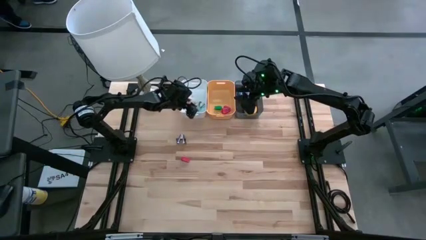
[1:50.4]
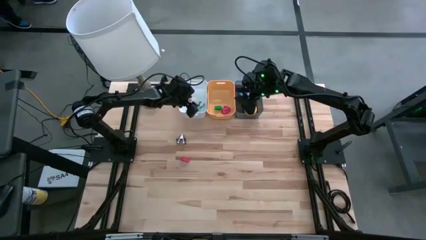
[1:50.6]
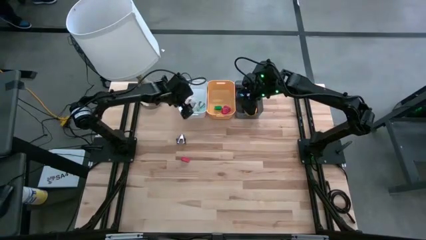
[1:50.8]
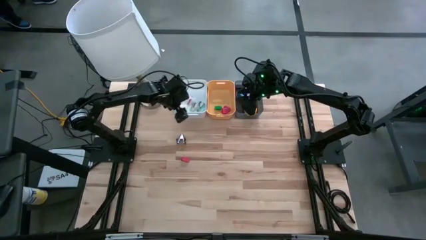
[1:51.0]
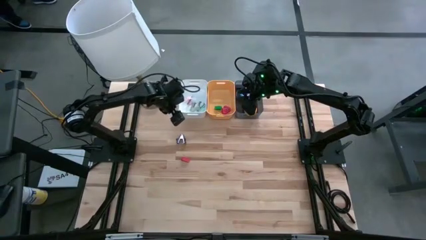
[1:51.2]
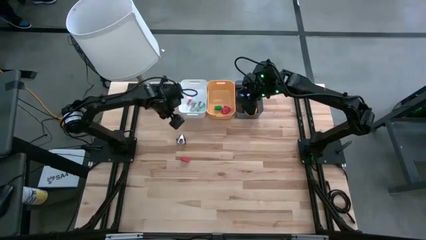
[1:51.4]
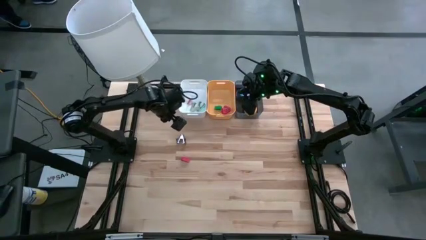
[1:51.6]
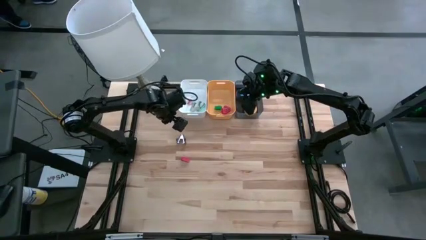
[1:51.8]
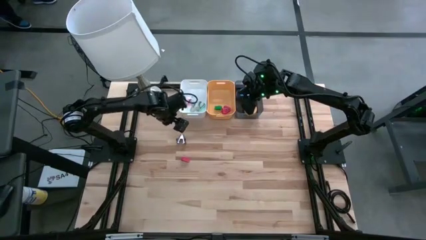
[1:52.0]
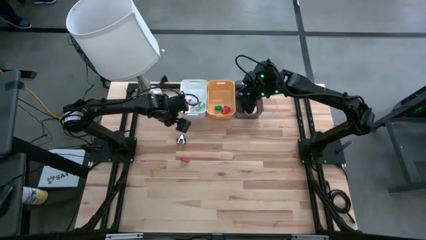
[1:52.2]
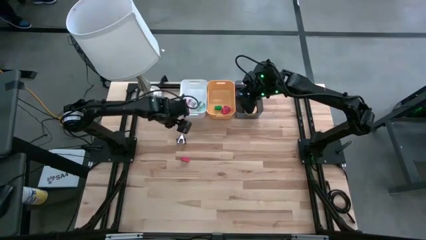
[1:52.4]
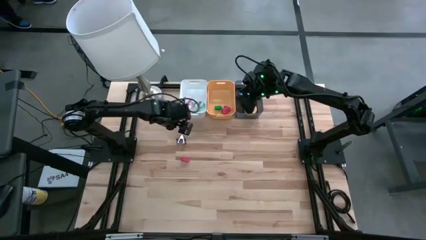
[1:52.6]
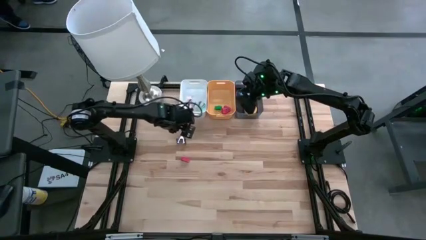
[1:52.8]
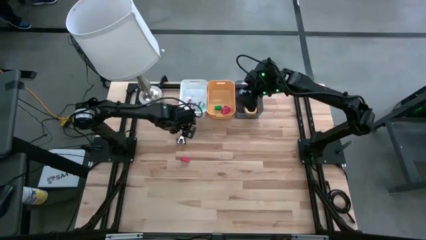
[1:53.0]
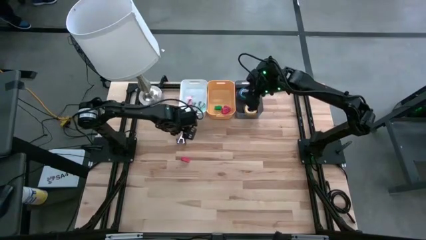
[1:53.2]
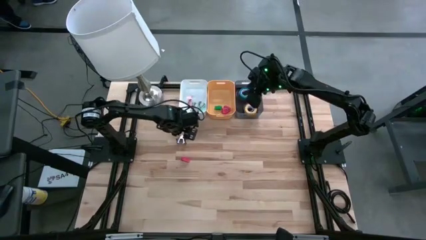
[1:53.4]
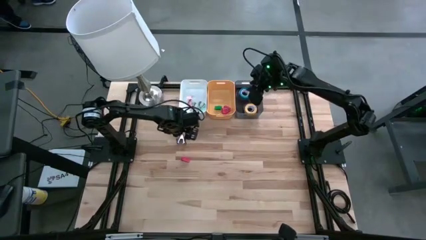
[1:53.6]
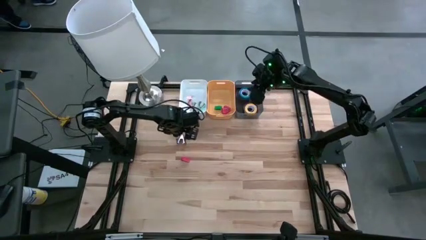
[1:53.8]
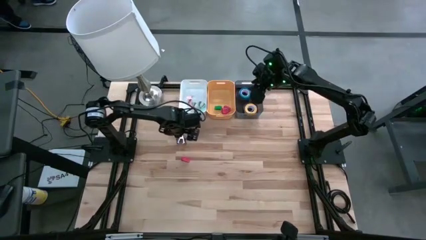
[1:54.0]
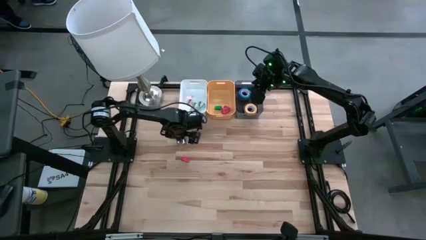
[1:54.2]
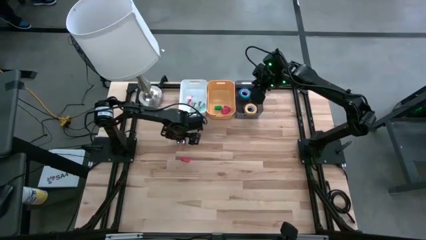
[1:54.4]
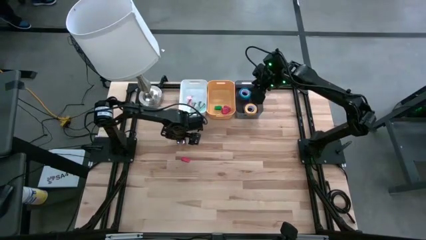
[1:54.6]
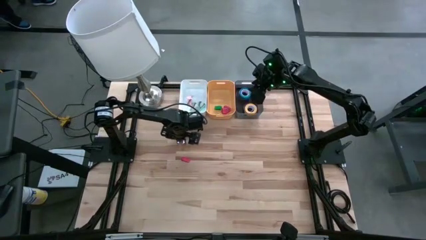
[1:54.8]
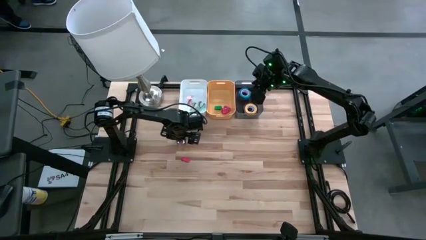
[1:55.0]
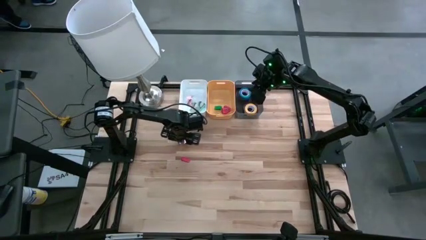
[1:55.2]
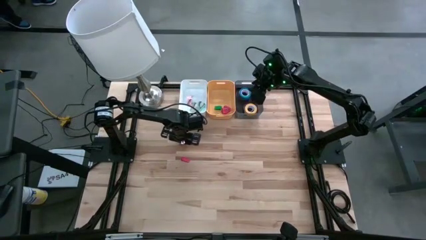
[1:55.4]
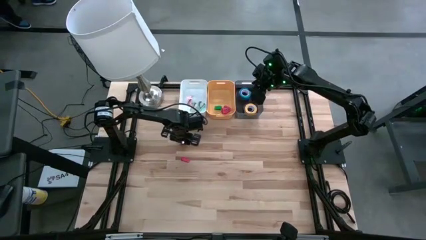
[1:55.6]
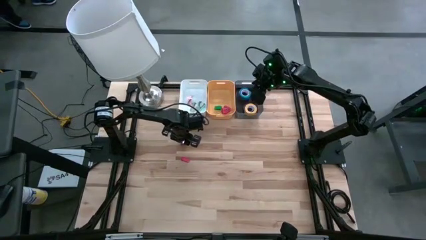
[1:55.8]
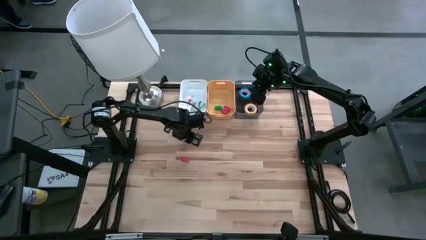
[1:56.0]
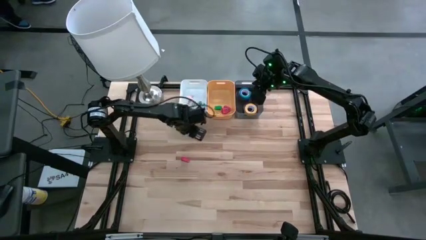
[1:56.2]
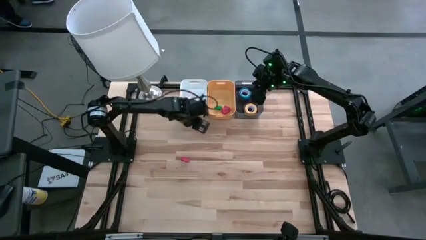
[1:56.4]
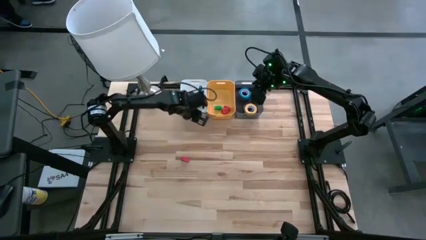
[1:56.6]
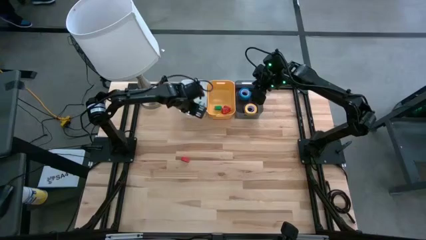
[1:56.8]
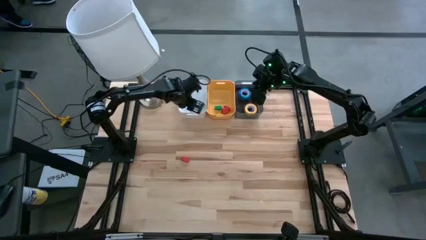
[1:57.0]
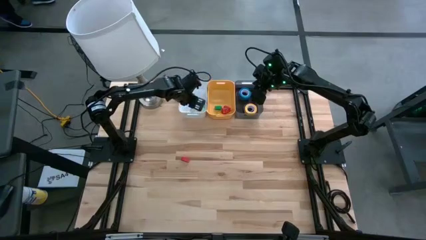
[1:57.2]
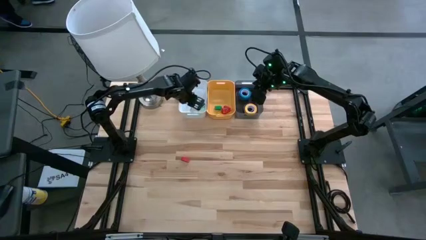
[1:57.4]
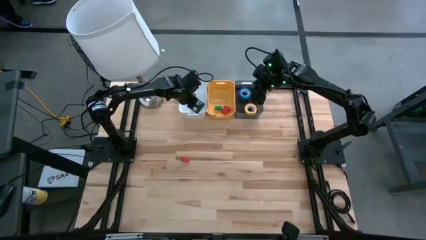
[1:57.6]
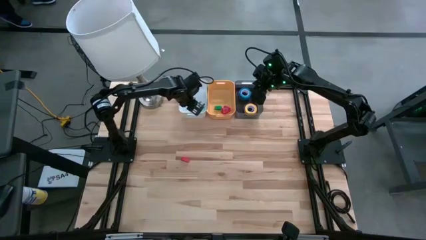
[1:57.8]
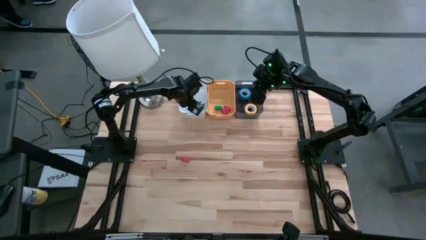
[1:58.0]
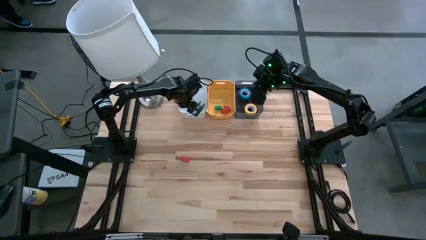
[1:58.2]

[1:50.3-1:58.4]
Task: Pick and place Stapler, Stapler remover, tape
Put the dark blue staple remover into the white bin

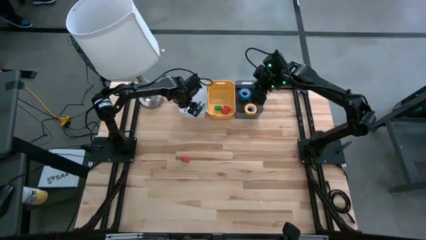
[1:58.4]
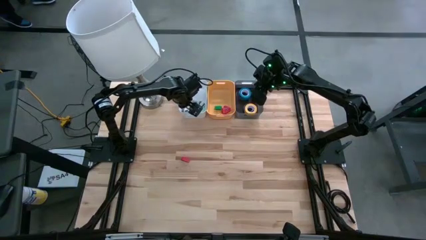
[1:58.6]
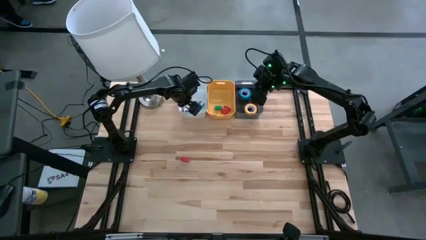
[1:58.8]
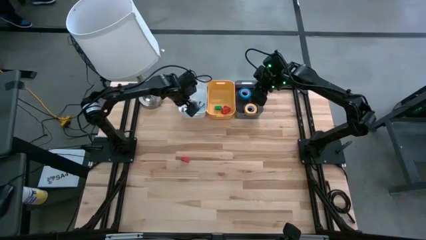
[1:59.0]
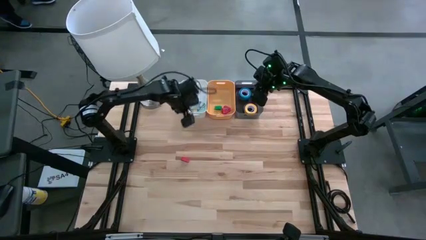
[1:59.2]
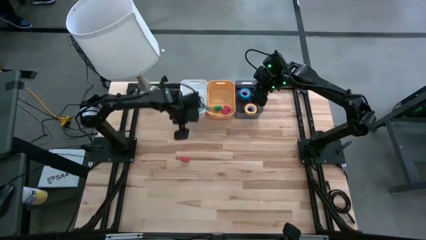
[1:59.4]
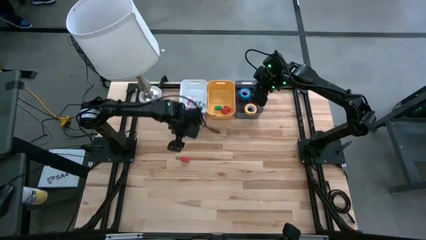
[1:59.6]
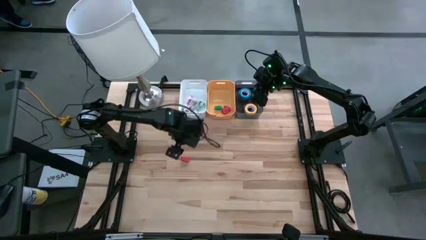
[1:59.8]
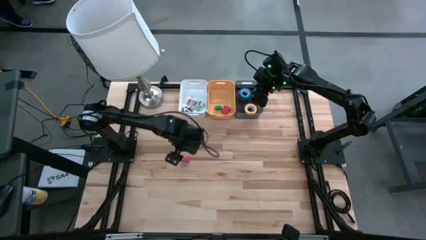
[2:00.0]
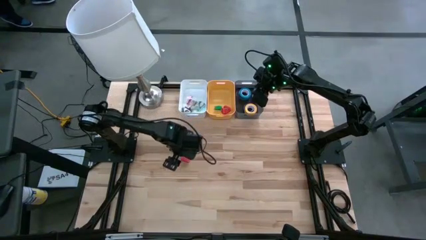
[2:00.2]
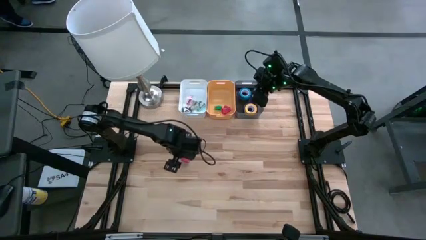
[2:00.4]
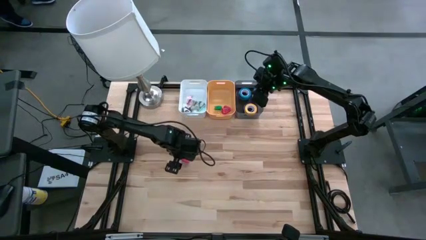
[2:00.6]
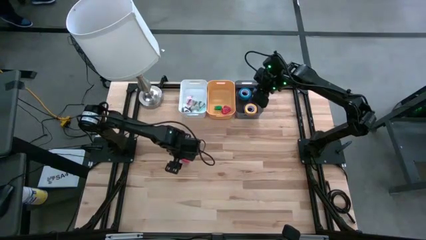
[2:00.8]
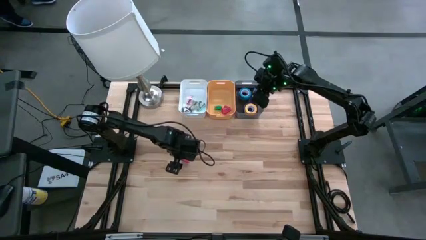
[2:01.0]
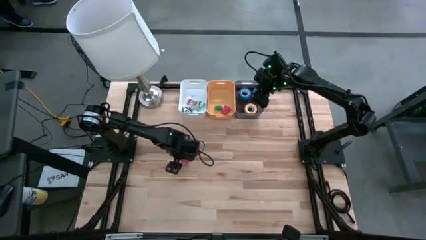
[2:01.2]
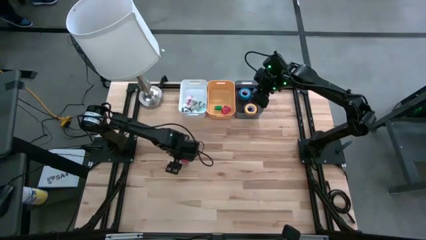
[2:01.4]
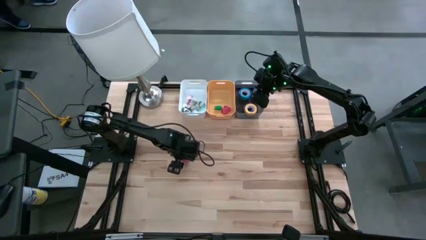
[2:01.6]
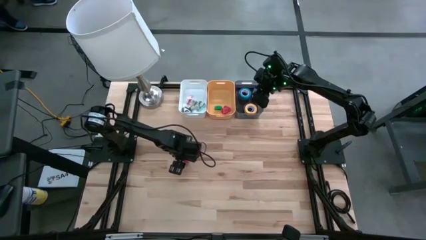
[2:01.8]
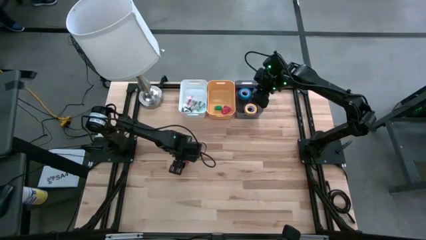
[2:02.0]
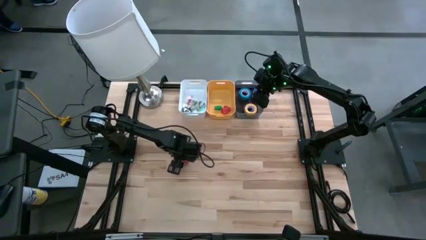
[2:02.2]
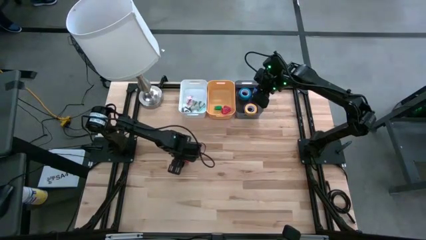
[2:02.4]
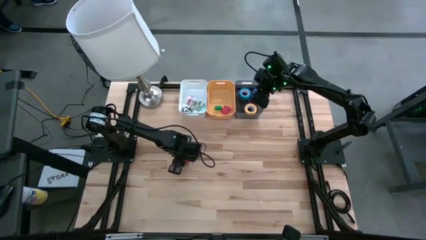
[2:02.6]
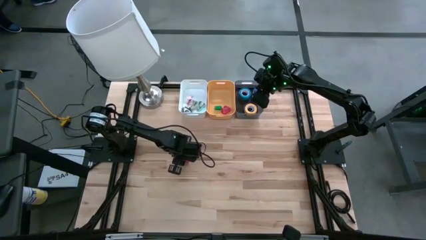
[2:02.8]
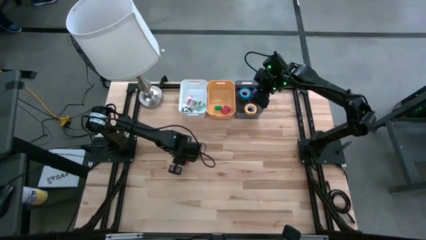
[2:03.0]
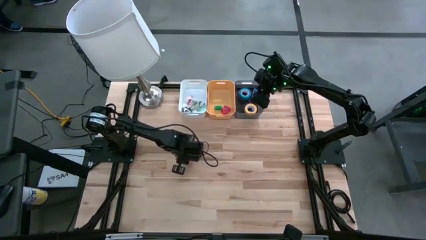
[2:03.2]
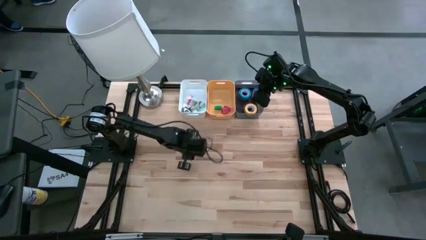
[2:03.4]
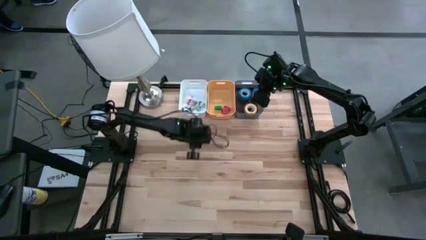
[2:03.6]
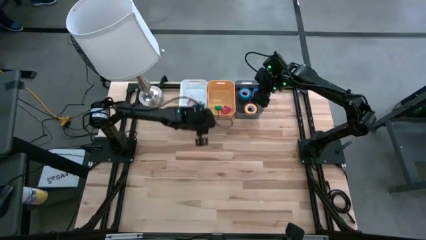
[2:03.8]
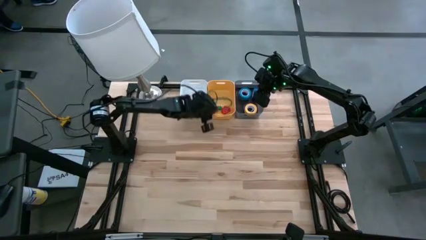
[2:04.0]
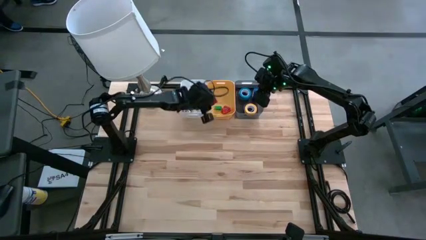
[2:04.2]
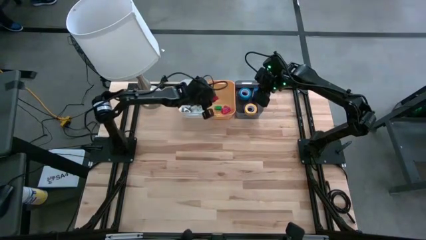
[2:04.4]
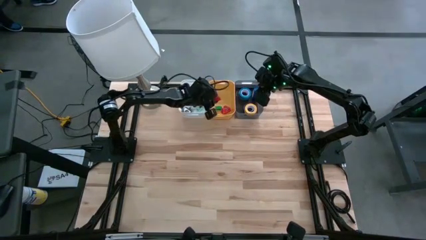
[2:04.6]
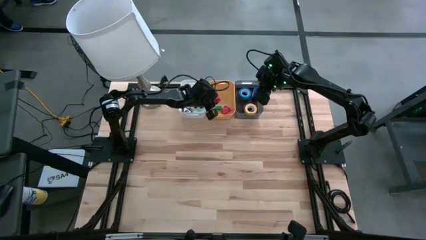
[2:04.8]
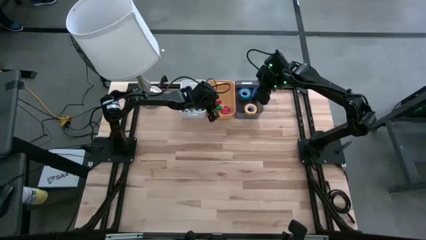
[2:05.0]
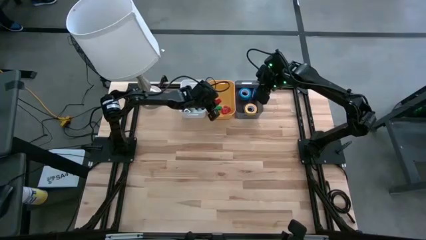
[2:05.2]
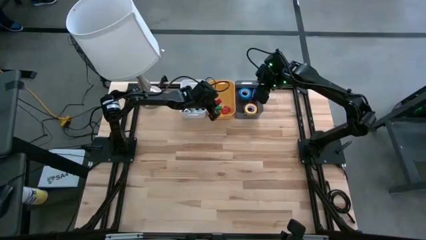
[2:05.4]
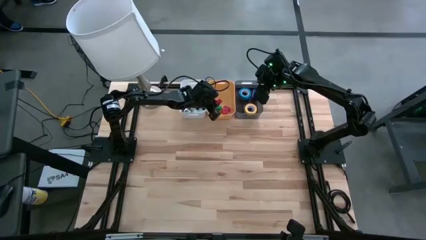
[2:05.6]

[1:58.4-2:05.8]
Put the red stapler into the yellow bin
